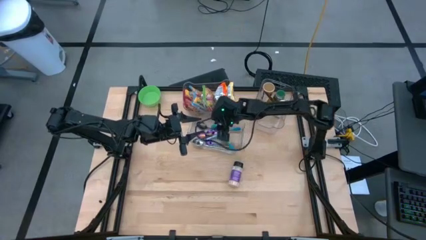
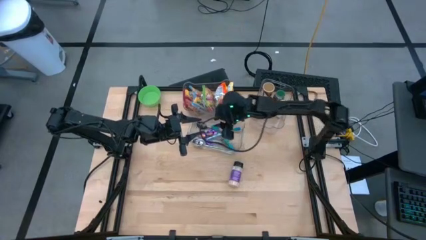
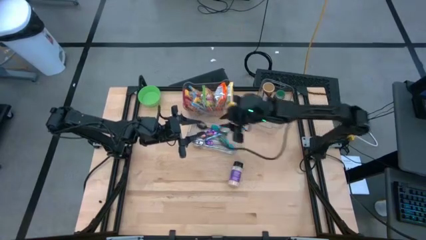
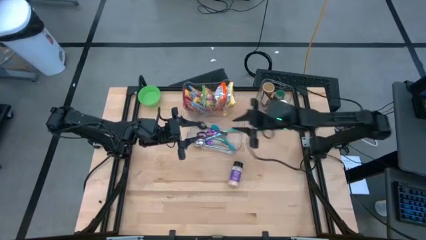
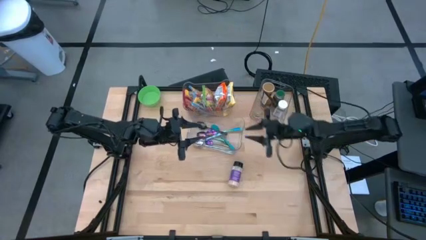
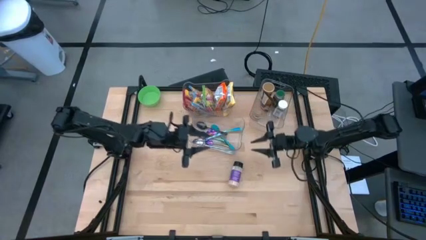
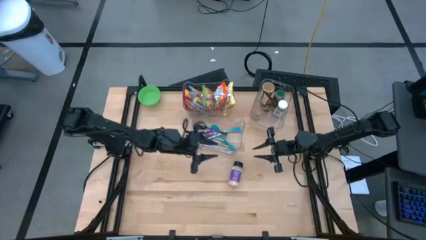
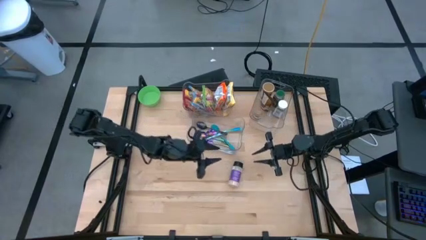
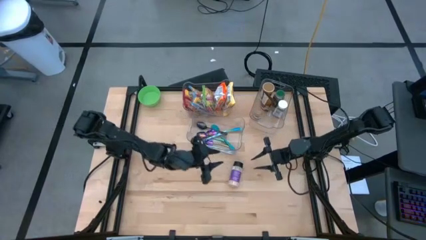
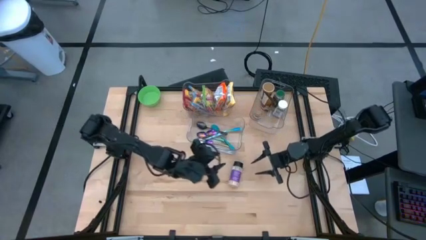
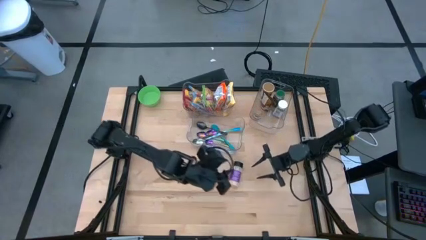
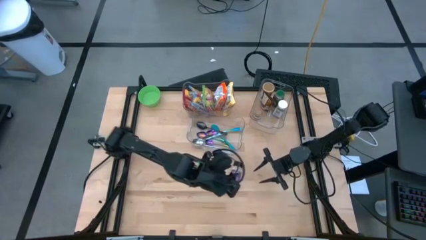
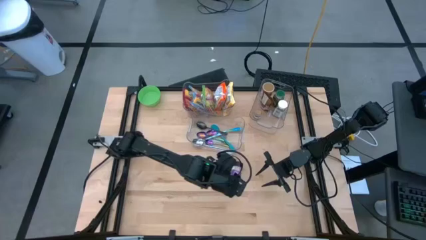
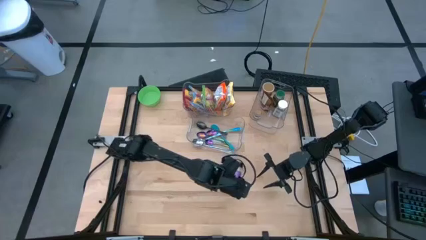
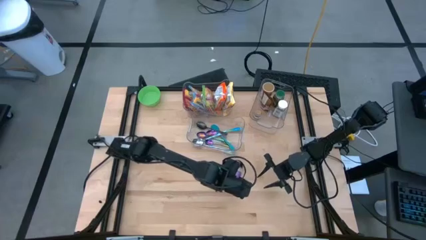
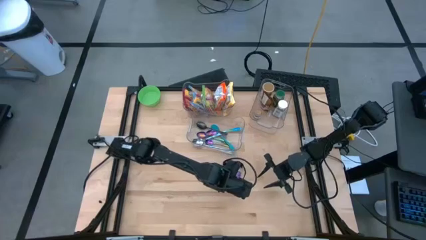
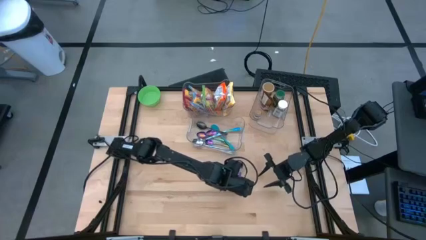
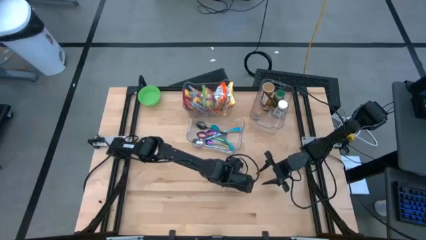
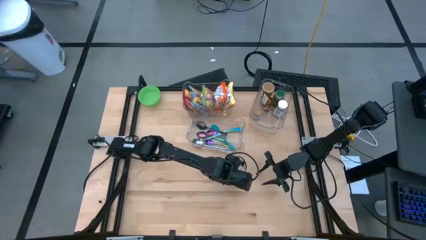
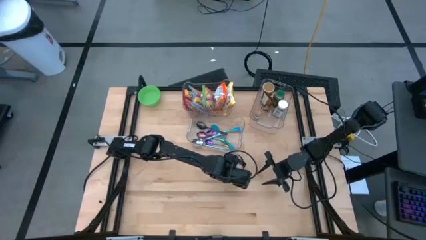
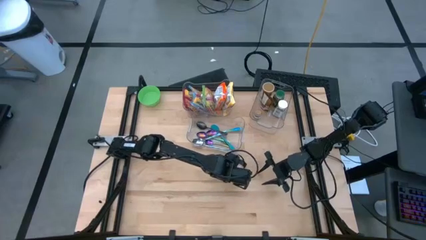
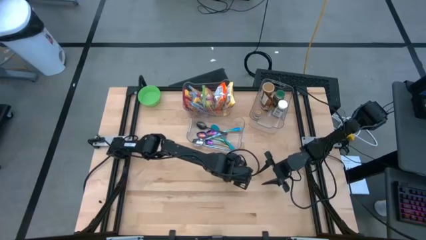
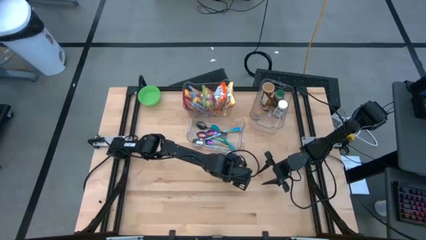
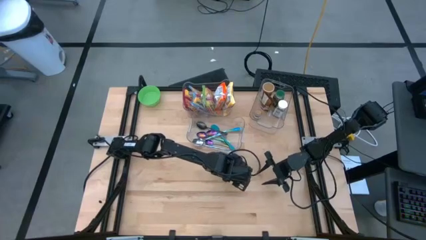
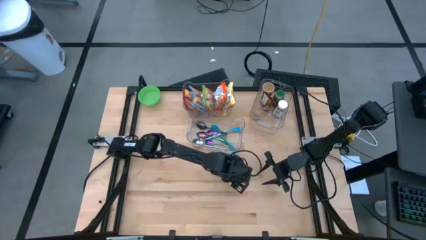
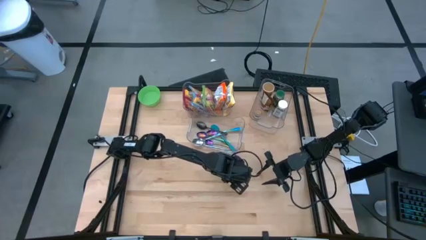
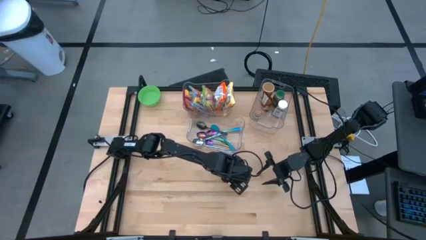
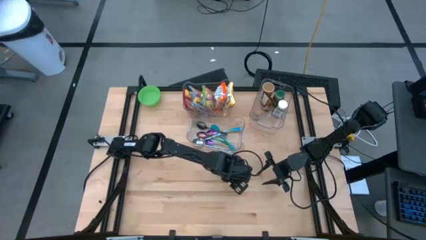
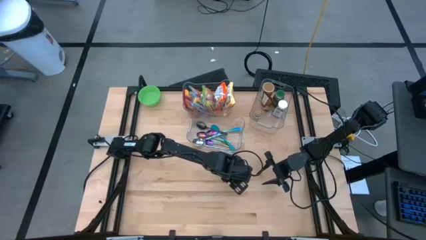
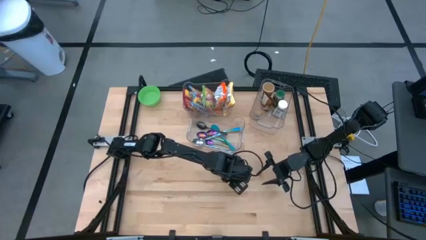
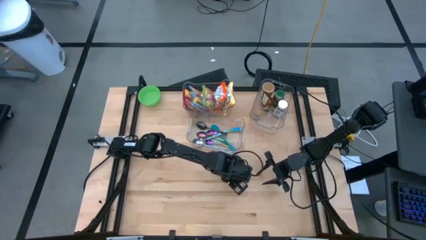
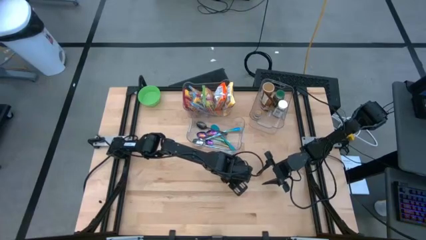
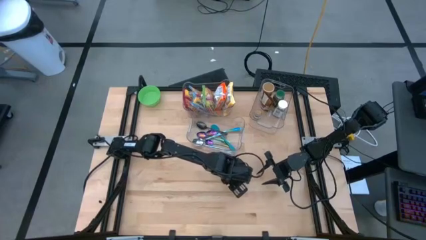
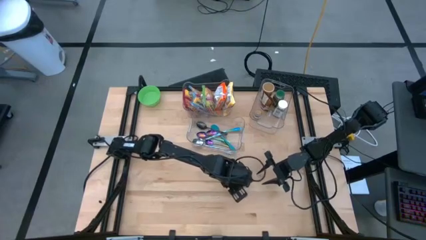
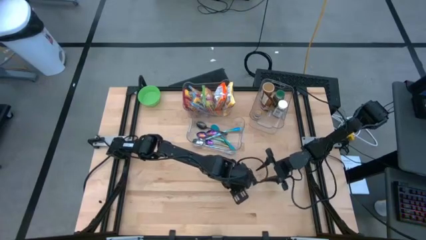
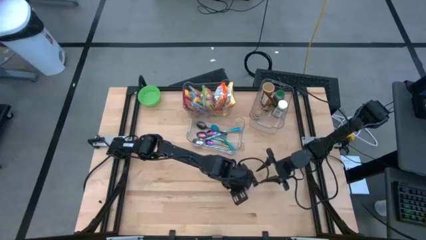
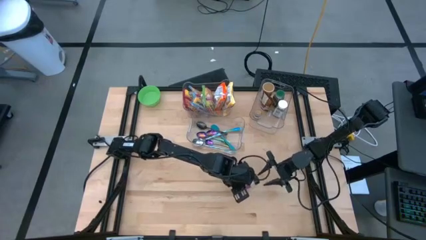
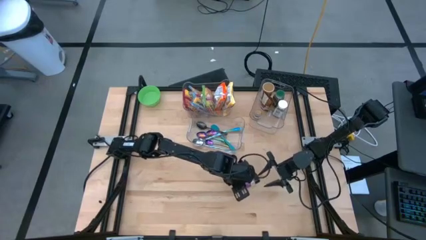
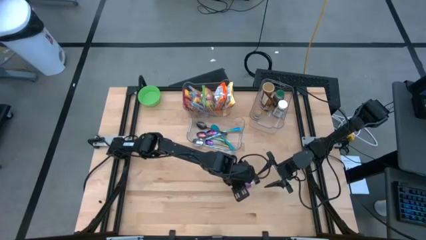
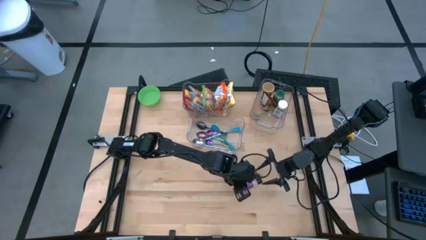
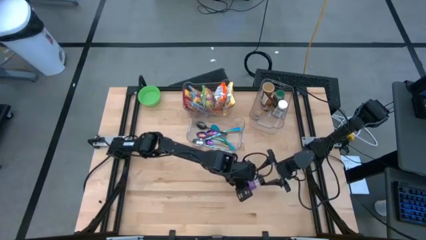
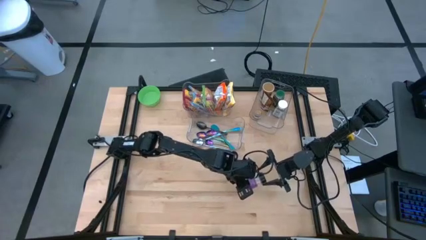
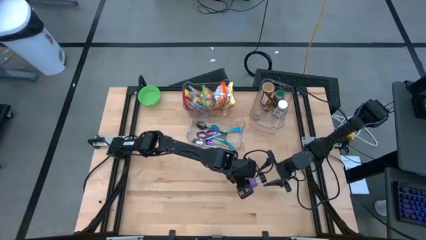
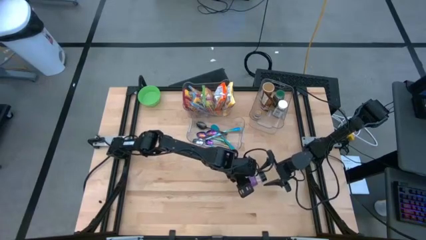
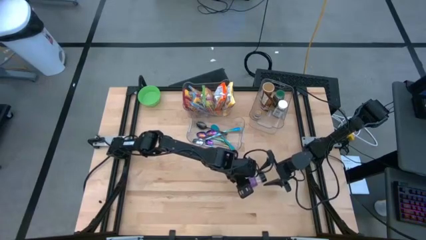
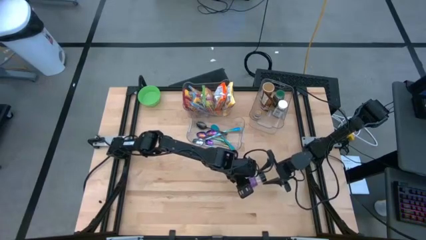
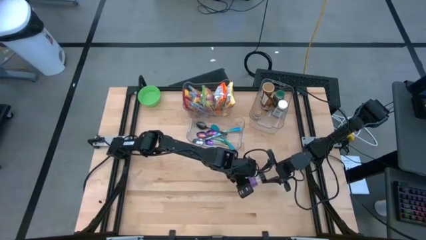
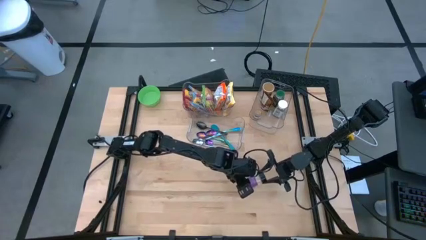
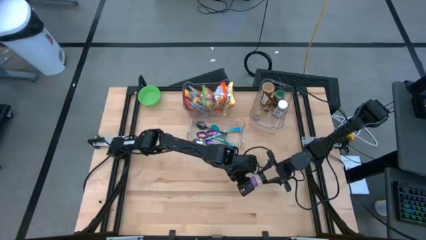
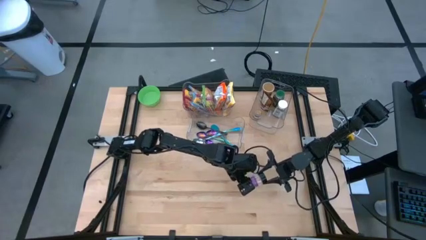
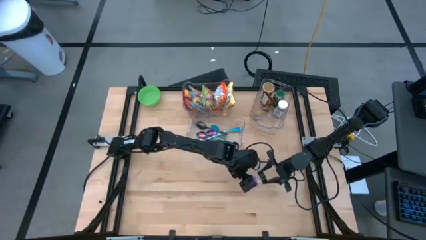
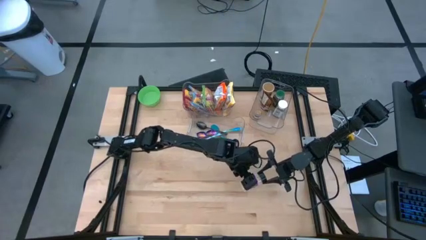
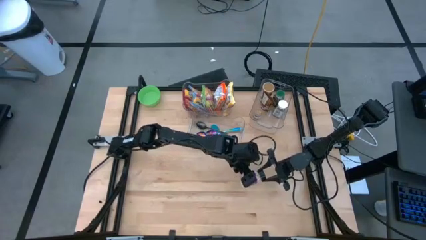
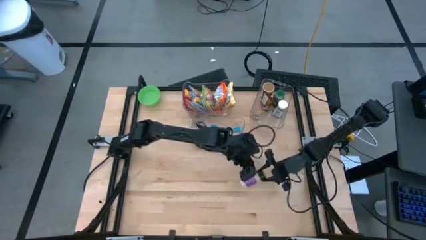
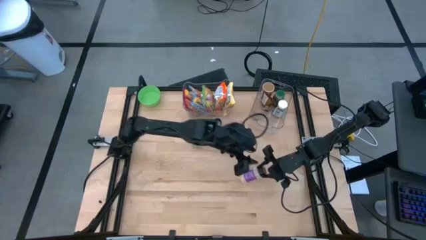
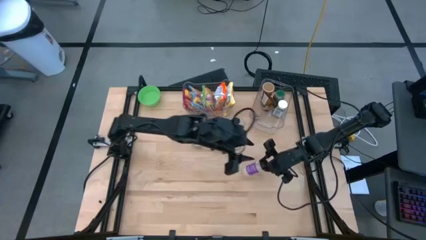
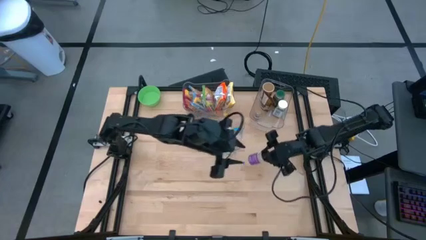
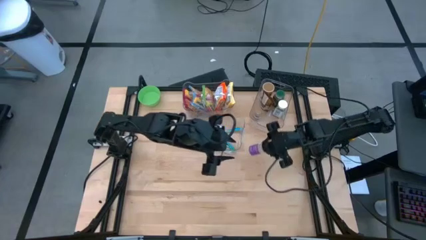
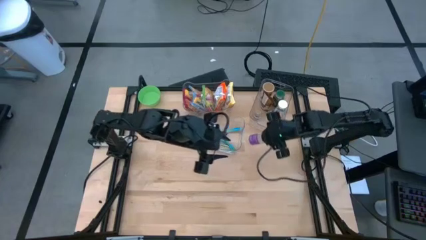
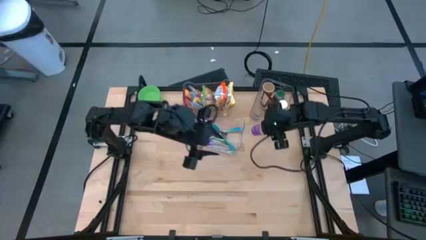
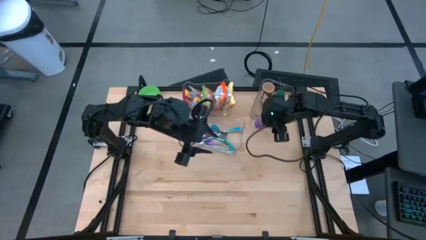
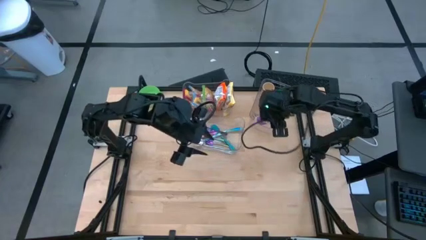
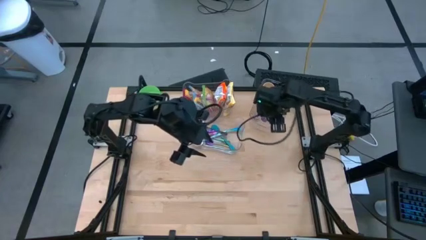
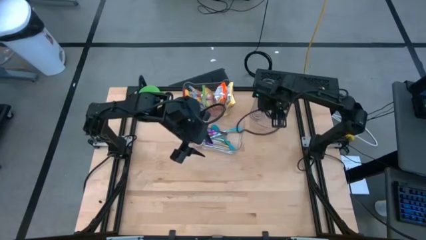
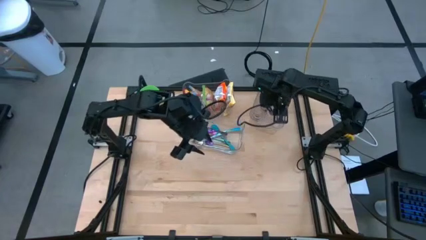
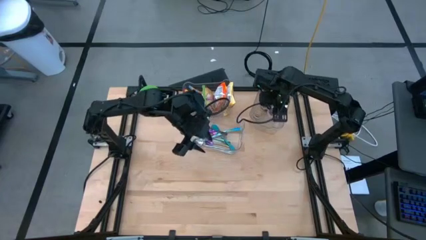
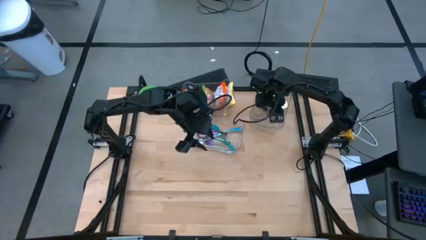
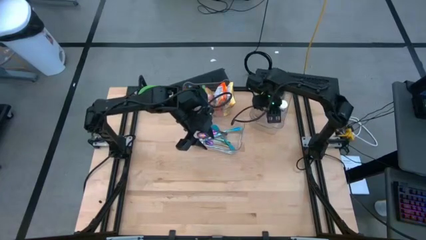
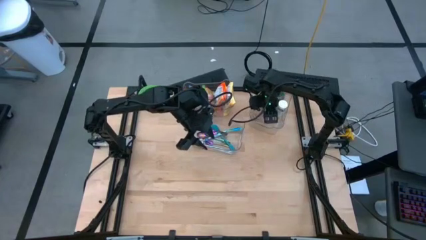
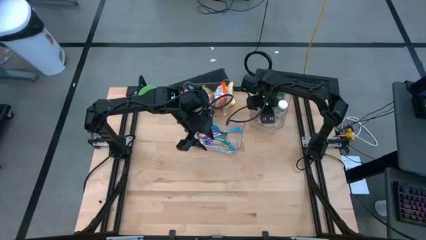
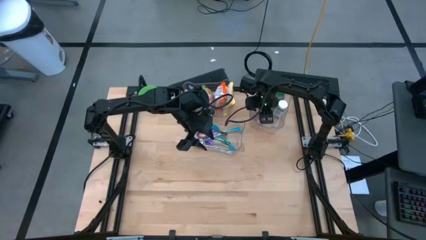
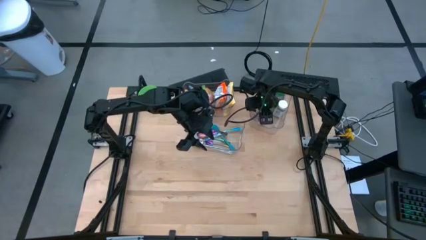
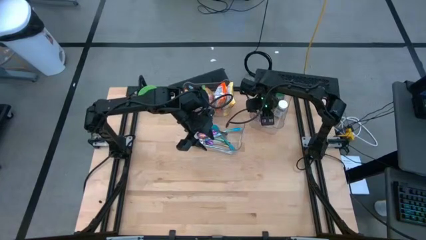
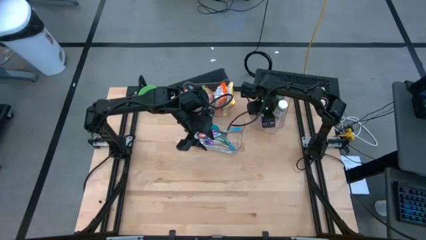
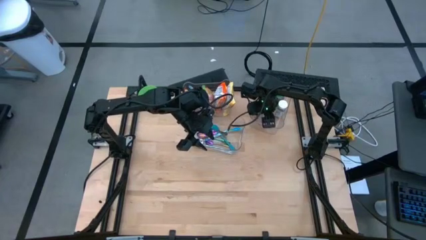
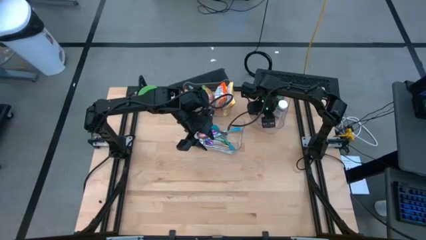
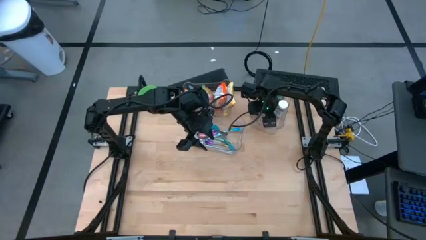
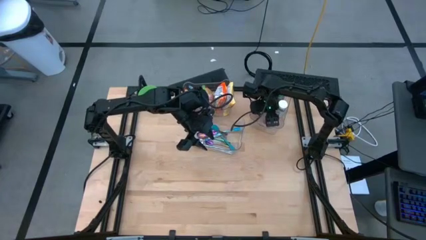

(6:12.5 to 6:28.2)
Task: Pick & Place Food Item
Put the purple seasoning bottle into the top right transparent bin
